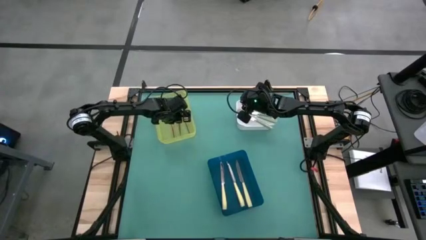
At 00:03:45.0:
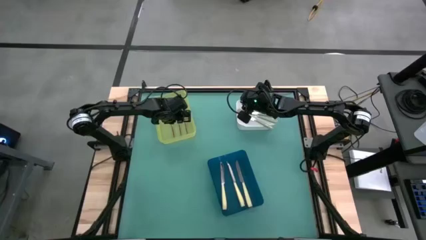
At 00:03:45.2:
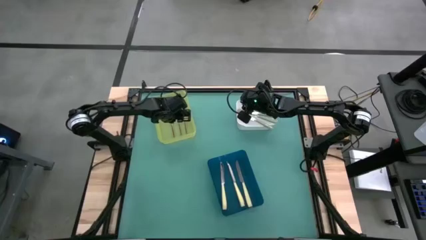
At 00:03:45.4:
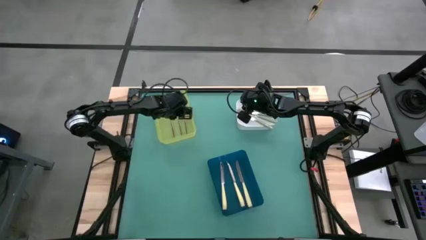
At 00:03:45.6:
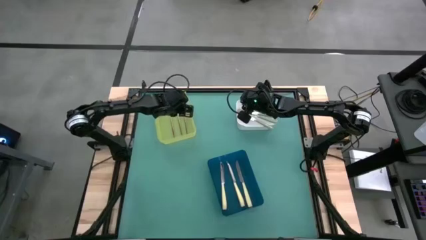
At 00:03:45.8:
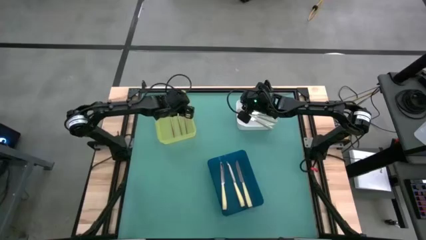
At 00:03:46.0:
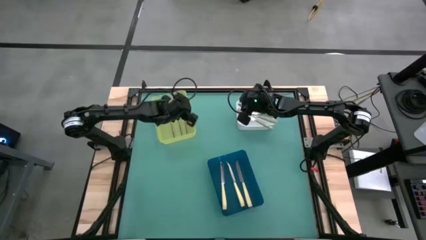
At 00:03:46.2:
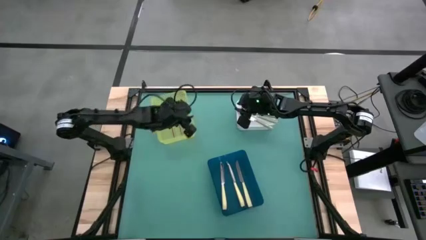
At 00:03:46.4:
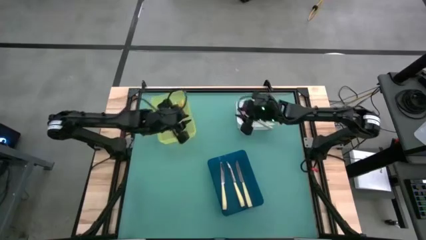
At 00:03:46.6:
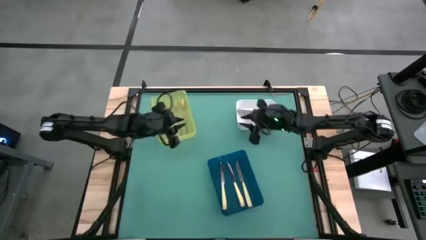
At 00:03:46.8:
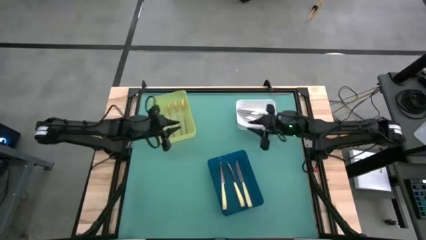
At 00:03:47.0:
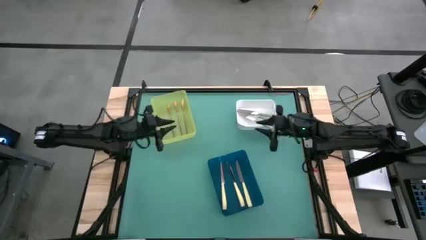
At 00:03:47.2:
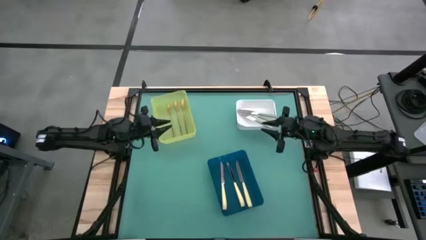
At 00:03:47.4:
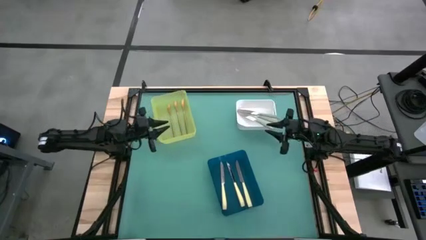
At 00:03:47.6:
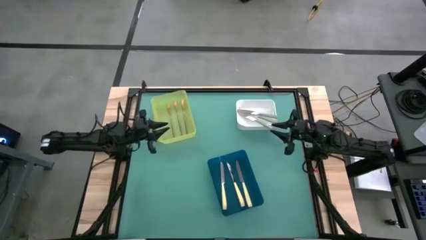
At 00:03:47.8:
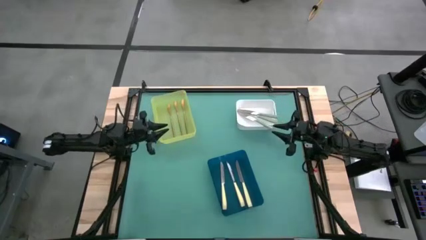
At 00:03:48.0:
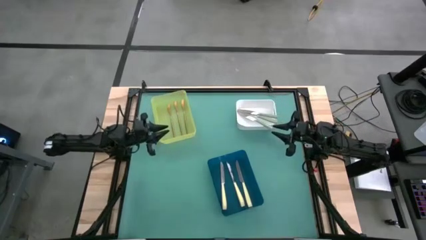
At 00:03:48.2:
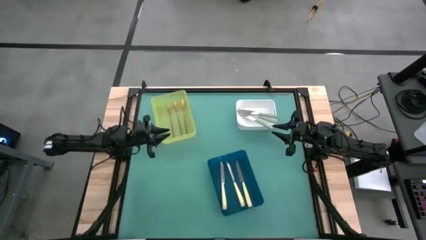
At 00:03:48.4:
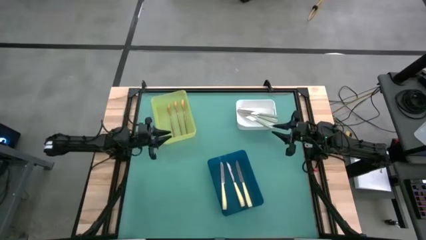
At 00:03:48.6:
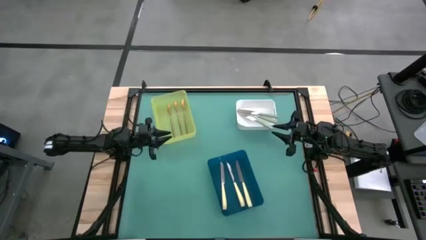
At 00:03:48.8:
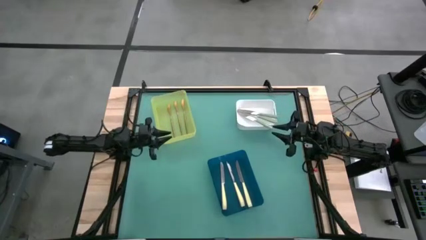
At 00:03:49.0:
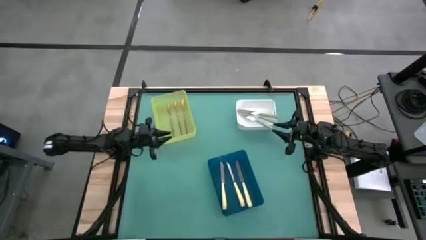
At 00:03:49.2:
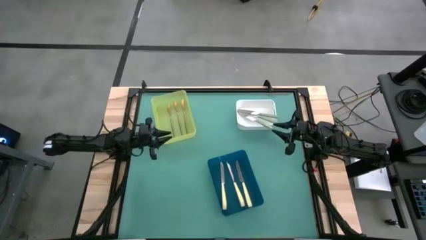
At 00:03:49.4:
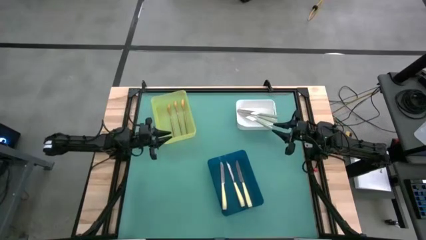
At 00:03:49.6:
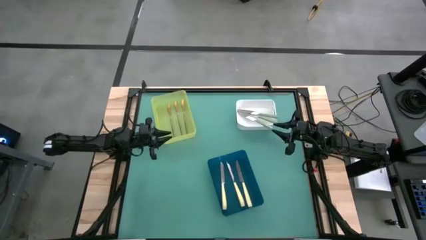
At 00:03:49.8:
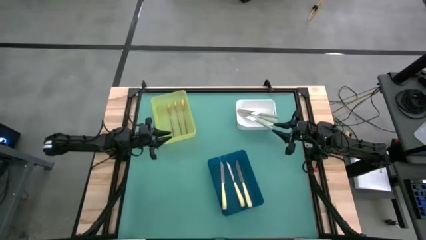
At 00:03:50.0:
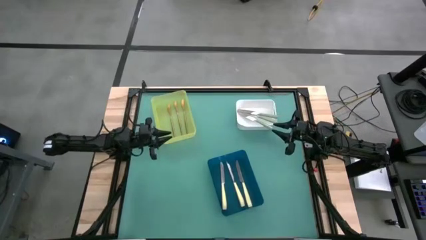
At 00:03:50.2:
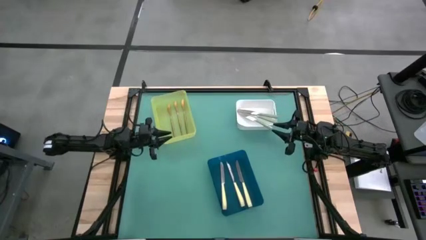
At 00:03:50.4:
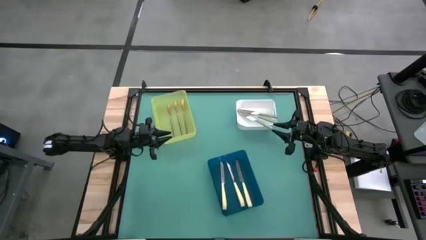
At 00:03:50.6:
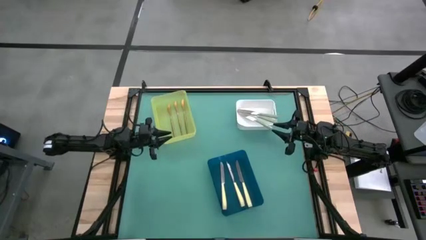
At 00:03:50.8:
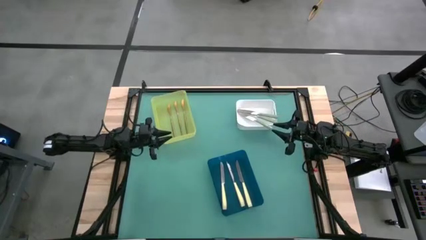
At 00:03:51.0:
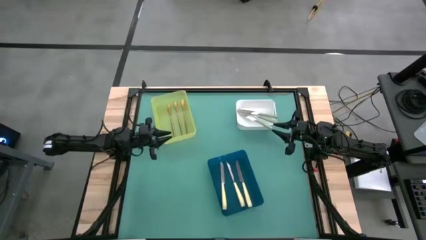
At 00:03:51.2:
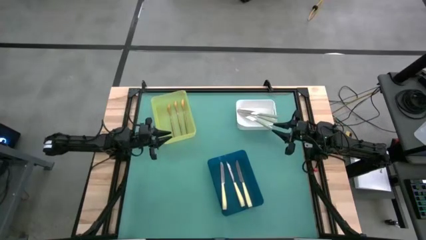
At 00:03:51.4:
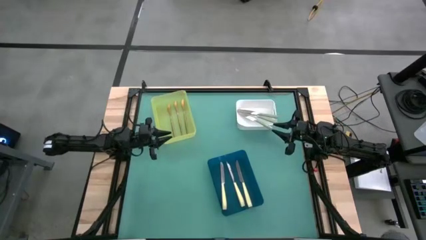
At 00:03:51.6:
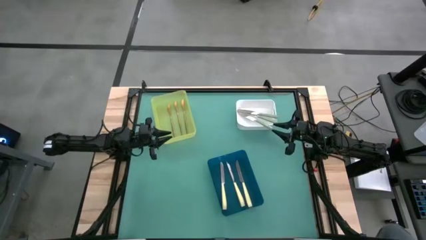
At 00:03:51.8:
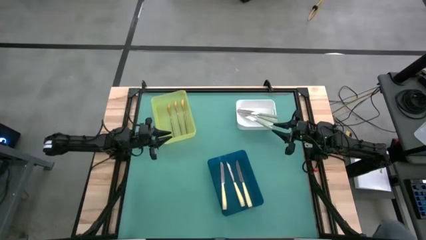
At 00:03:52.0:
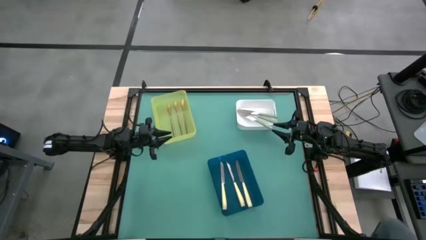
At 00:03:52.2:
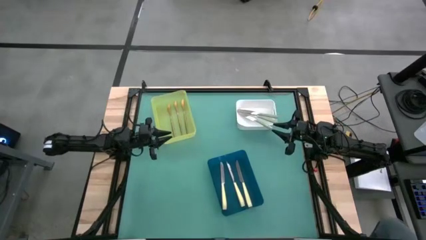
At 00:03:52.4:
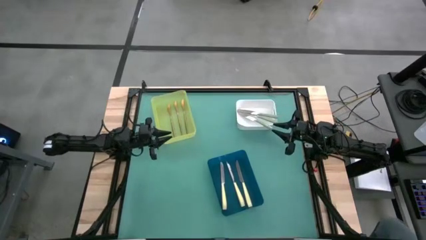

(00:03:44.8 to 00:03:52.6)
Task: Sort silverware by color (type)
Return to Home Position

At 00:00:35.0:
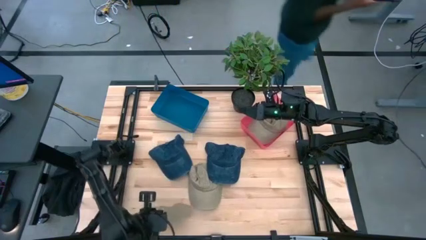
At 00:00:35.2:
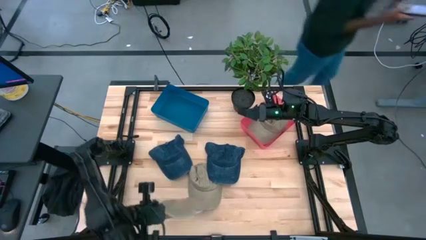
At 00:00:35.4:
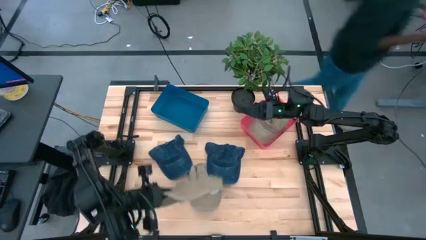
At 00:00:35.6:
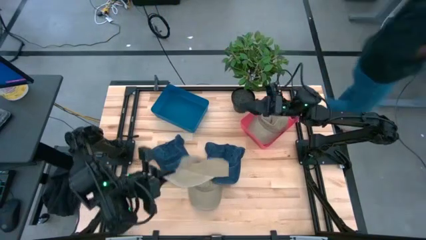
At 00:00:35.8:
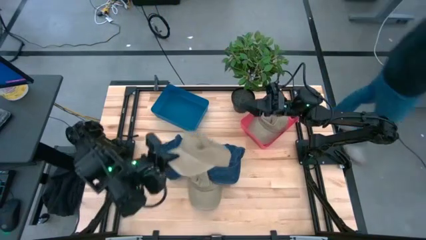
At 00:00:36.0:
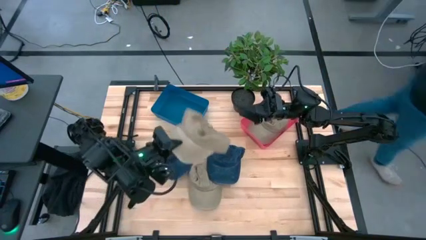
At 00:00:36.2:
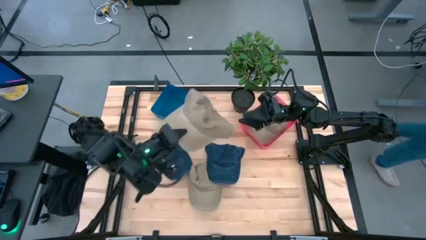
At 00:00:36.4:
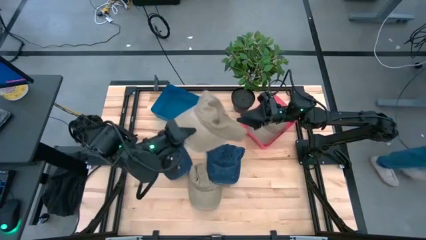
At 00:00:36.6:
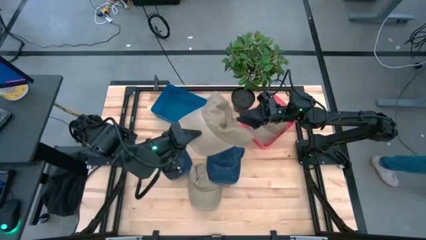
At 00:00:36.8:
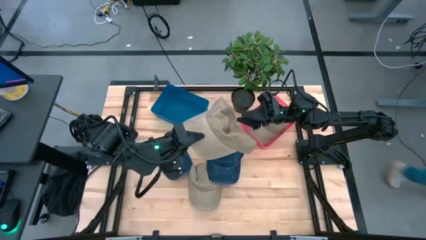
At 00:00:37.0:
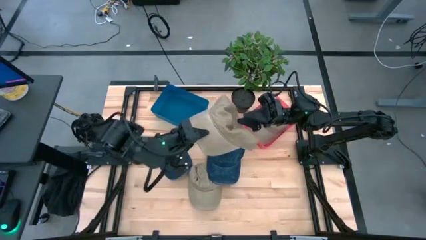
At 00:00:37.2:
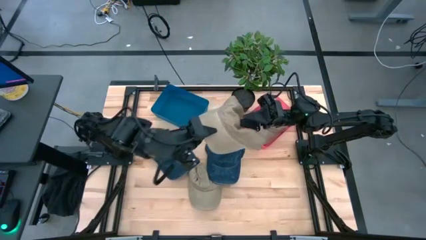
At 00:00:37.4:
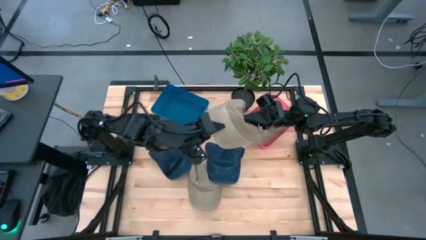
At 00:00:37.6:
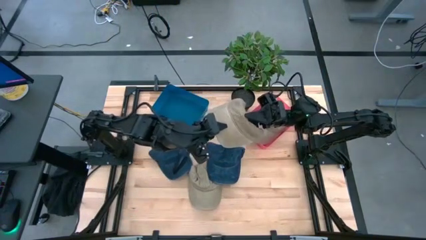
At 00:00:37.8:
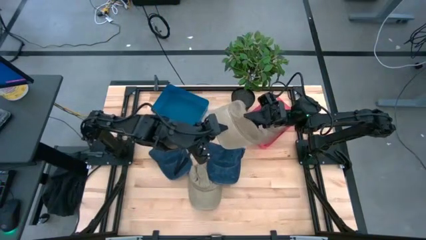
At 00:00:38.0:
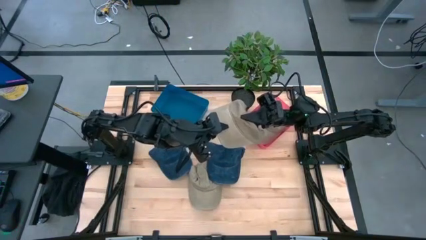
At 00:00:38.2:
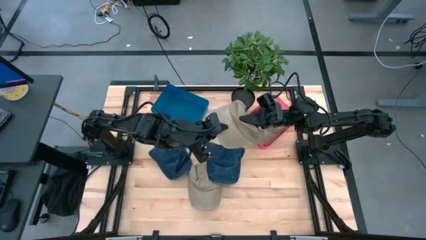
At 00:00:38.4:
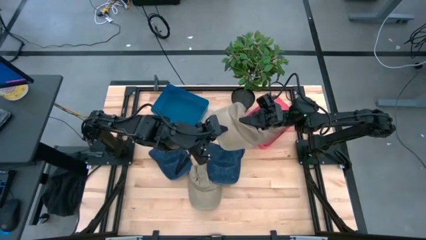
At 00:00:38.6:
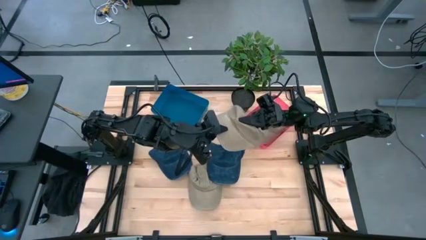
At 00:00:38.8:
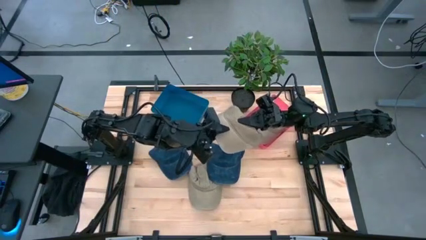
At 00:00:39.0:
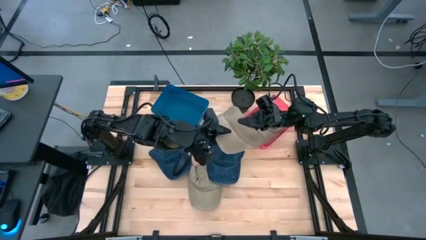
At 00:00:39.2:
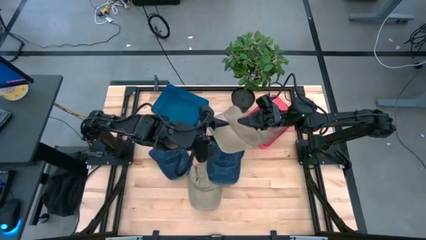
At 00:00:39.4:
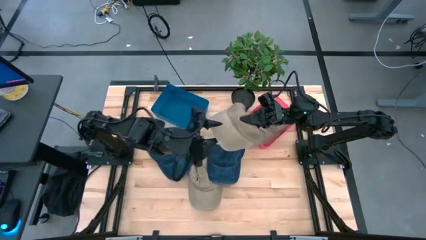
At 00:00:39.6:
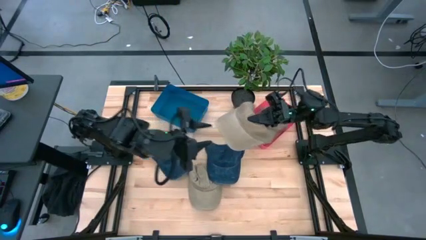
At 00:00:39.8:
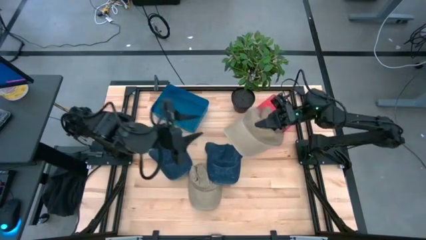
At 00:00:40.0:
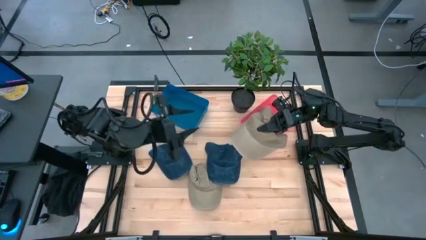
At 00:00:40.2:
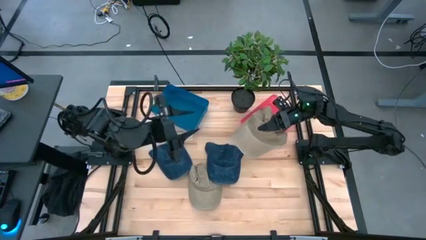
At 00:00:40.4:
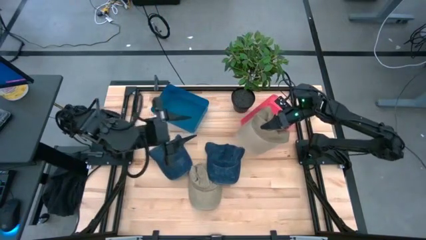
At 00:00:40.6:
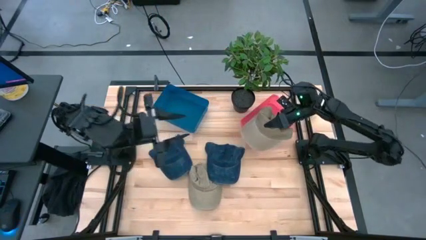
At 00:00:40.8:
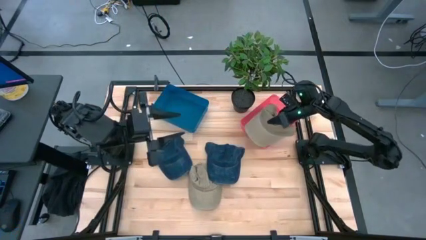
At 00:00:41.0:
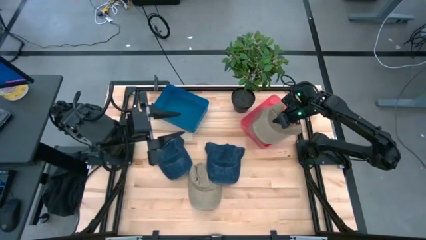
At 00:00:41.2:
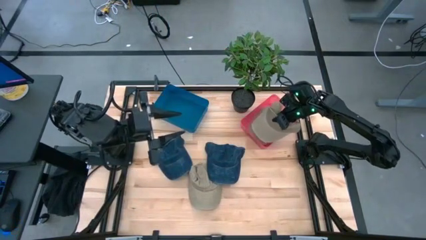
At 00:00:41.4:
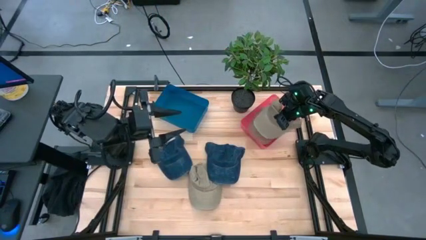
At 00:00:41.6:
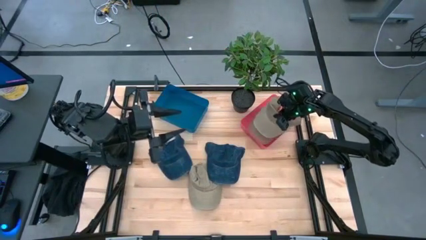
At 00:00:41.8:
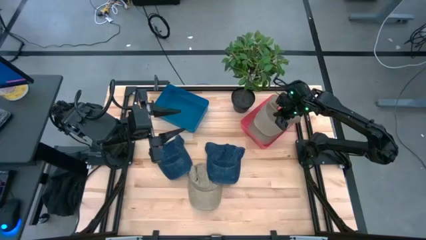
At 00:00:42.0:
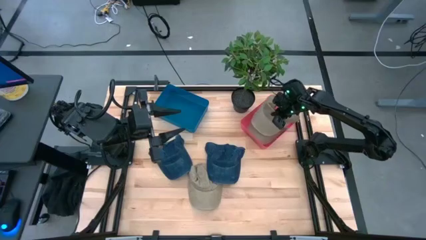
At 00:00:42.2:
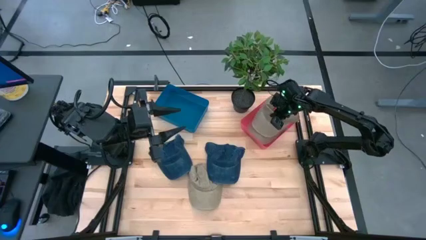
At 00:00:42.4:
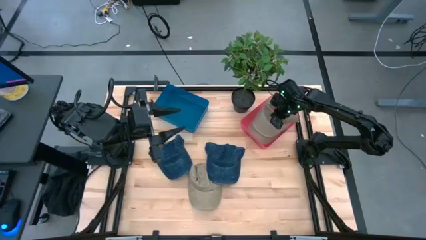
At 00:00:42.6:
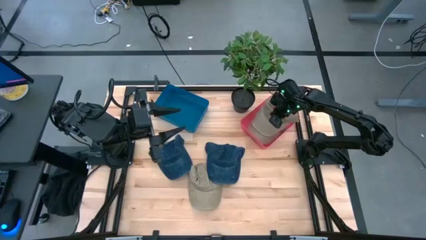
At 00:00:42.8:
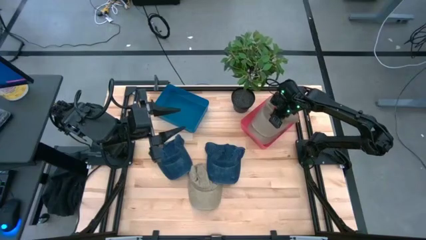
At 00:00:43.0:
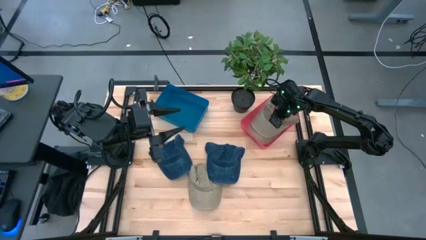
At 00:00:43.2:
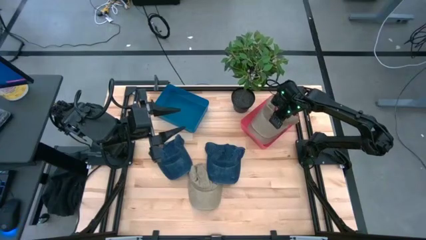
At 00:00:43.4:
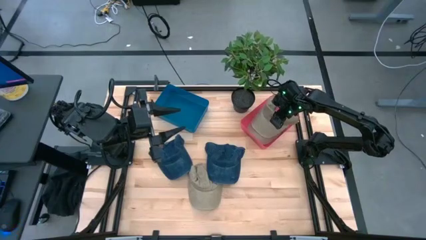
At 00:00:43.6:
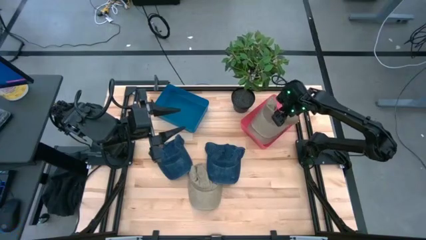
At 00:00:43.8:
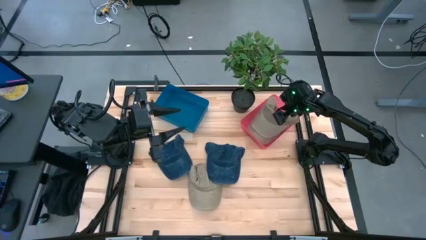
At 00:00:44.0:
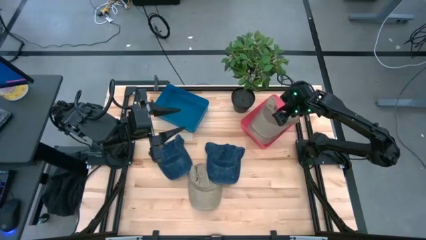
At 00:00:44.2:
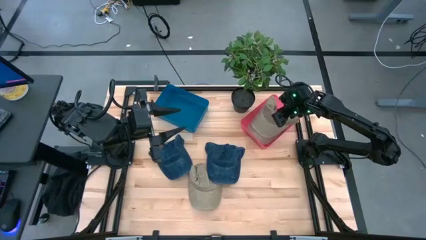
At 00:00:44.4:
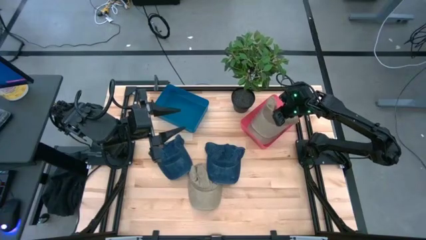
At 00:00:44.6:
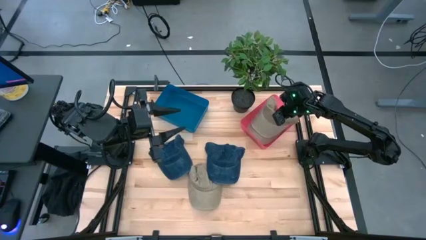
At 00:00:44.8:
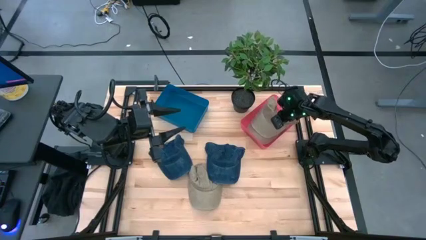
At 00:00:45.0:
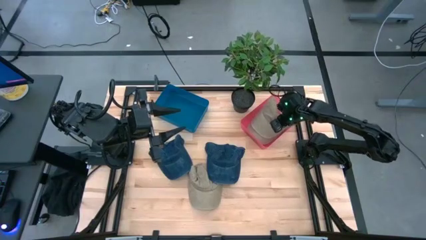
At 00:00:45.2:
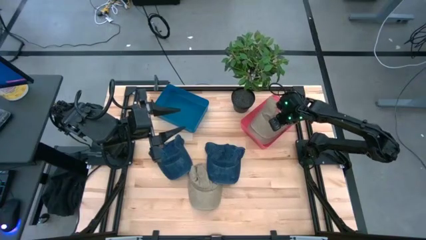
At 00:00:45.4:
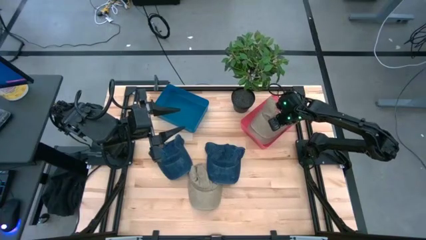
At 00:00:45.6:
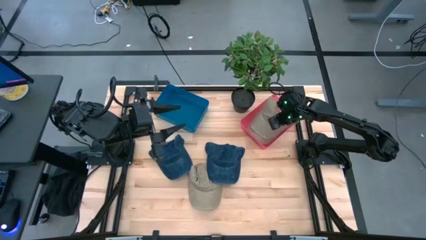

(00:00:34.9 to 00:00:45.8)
Task: Pick & Place hat
Put the left brown cap into the red bin
